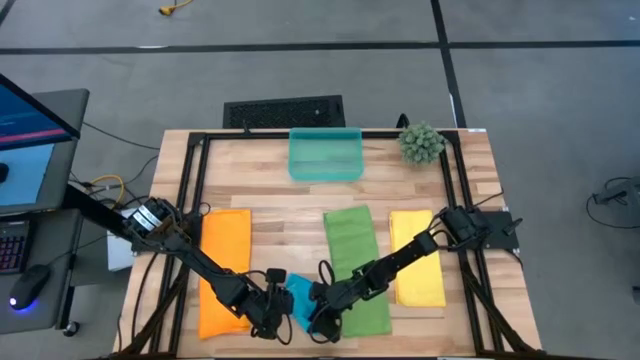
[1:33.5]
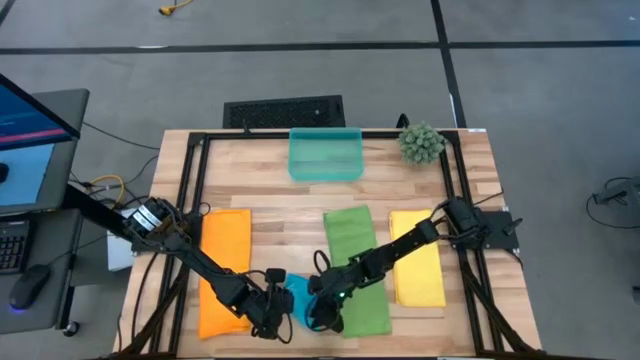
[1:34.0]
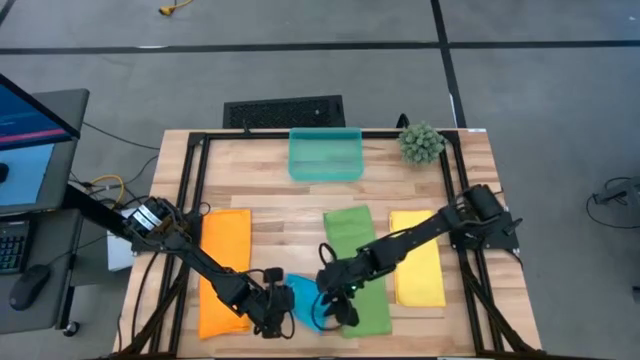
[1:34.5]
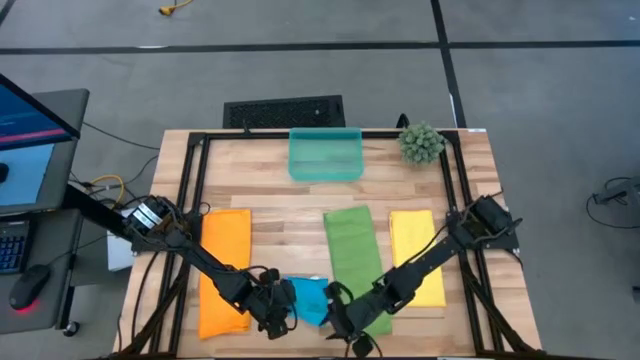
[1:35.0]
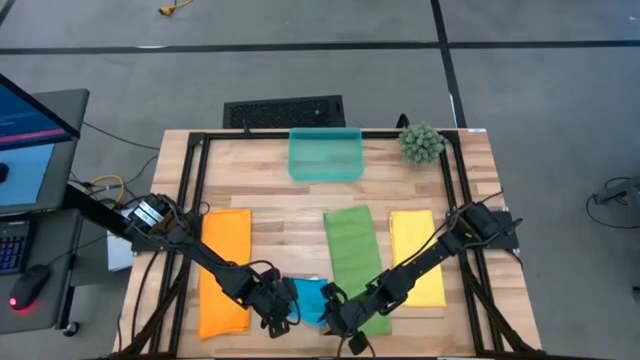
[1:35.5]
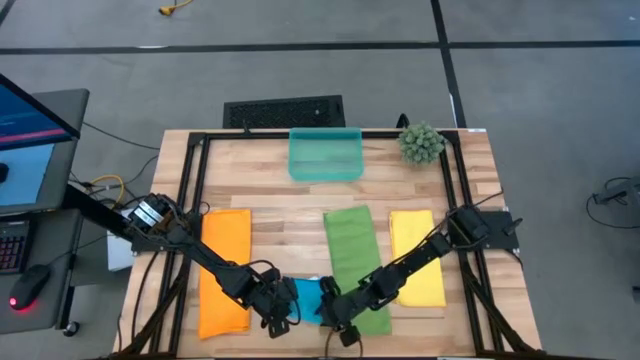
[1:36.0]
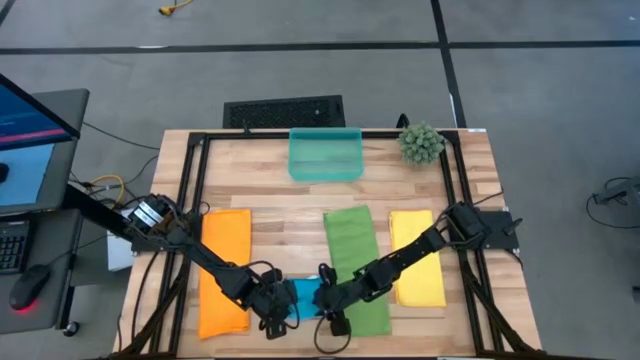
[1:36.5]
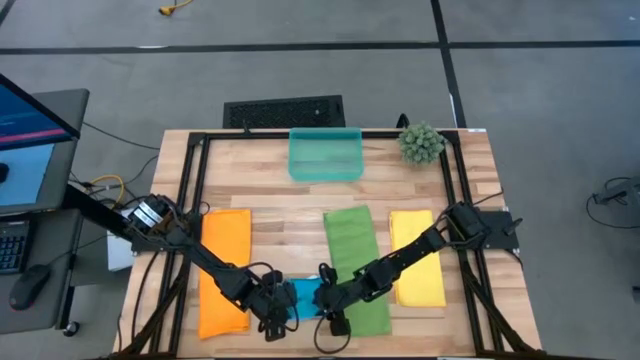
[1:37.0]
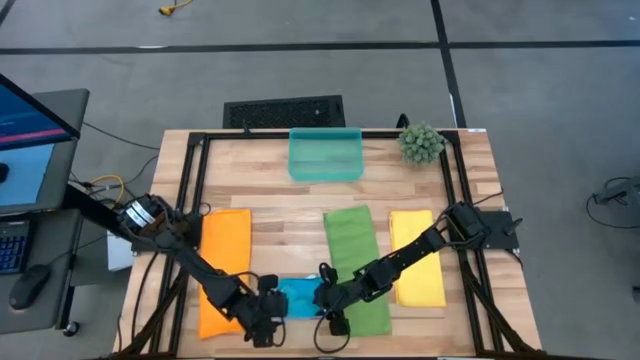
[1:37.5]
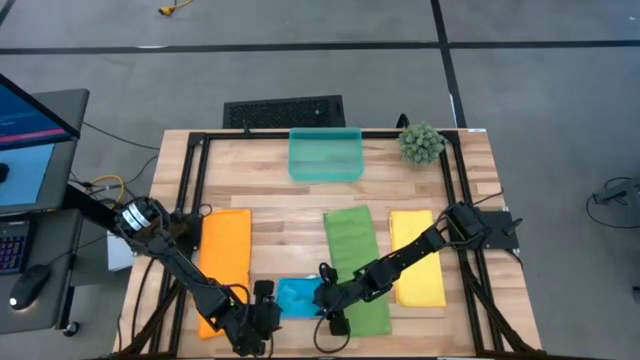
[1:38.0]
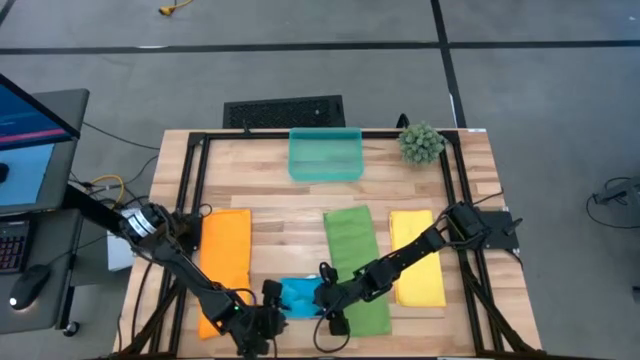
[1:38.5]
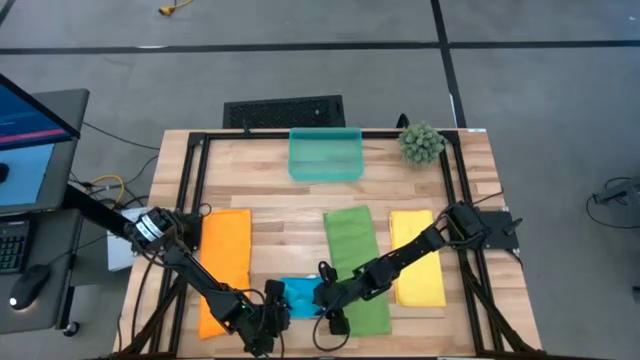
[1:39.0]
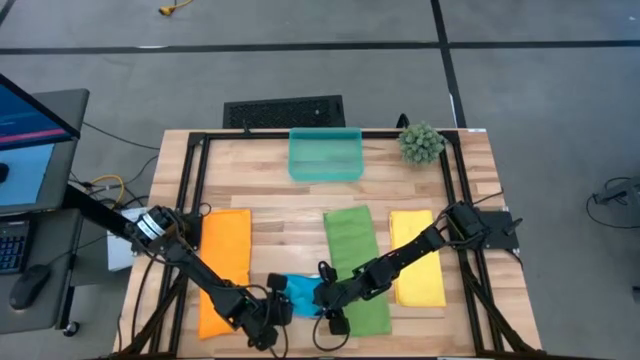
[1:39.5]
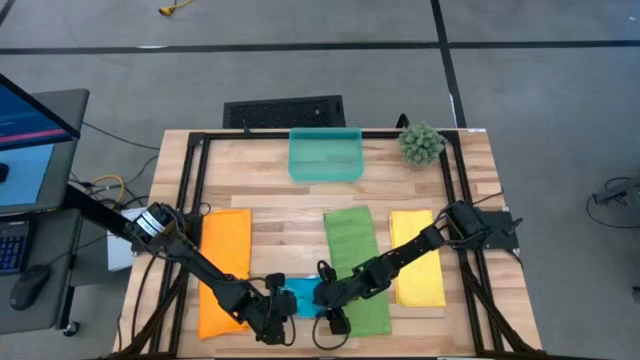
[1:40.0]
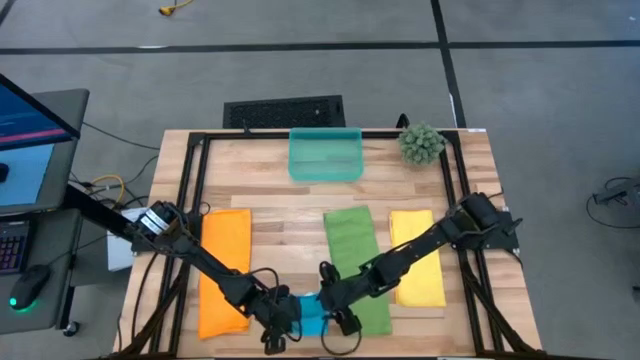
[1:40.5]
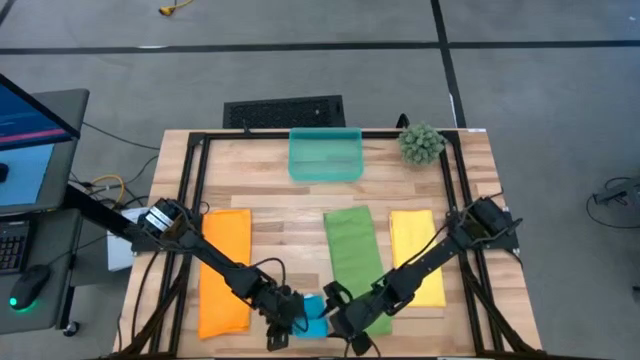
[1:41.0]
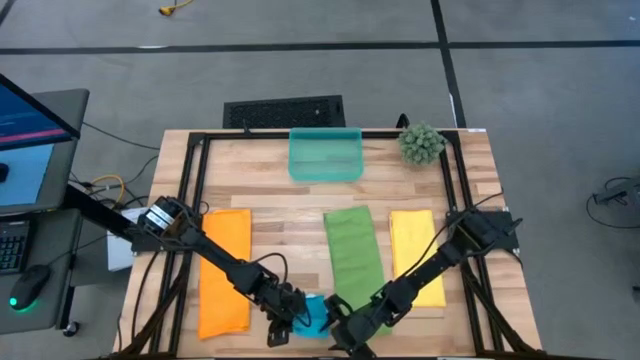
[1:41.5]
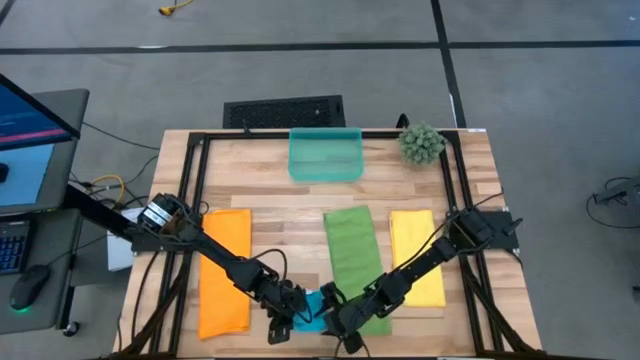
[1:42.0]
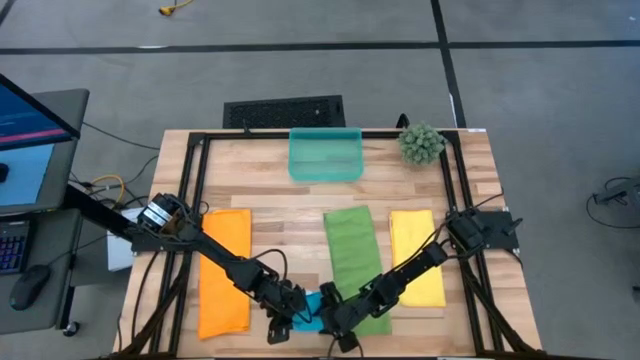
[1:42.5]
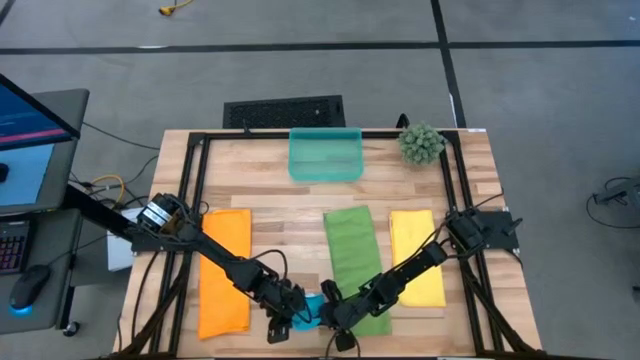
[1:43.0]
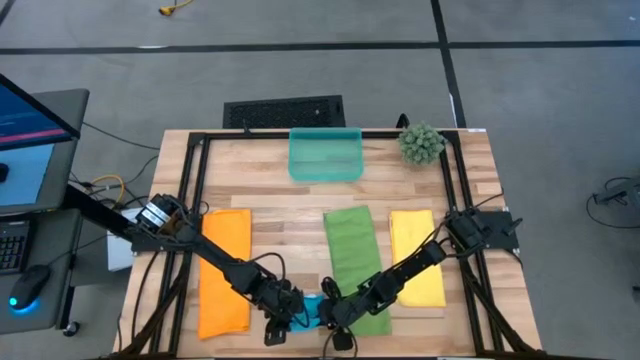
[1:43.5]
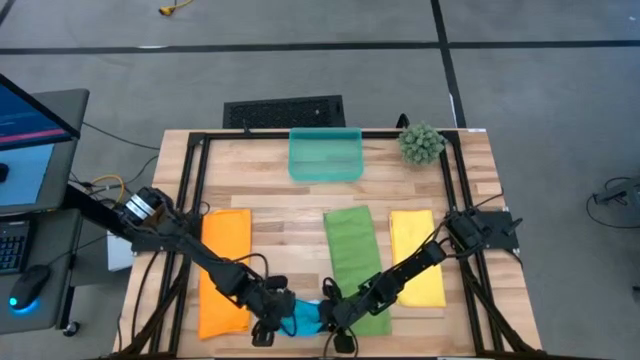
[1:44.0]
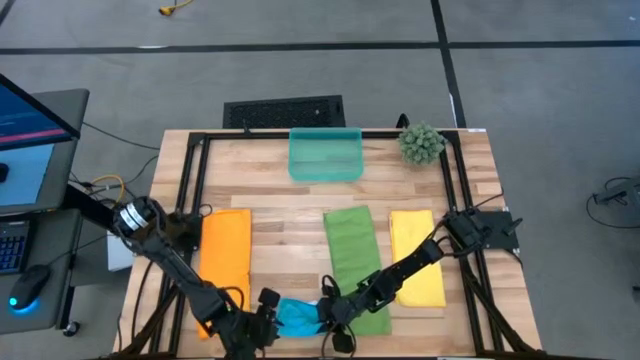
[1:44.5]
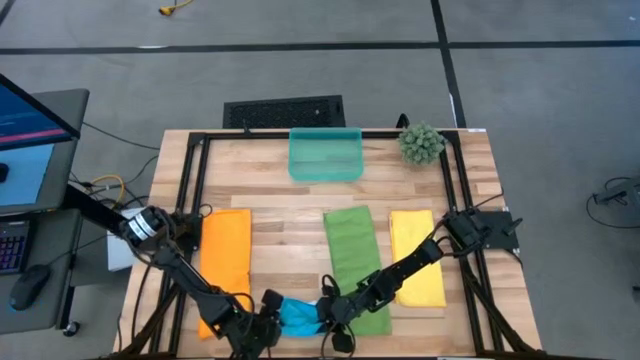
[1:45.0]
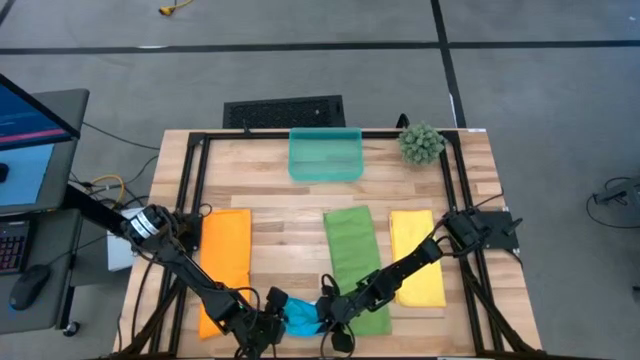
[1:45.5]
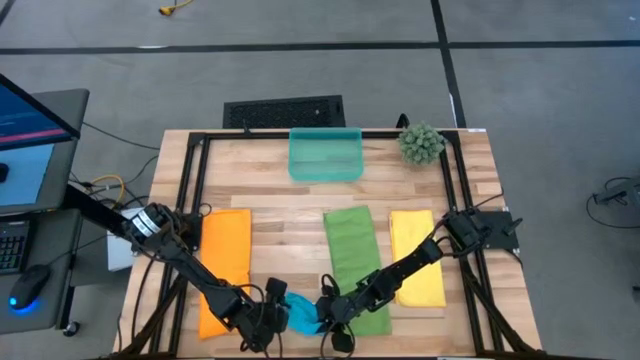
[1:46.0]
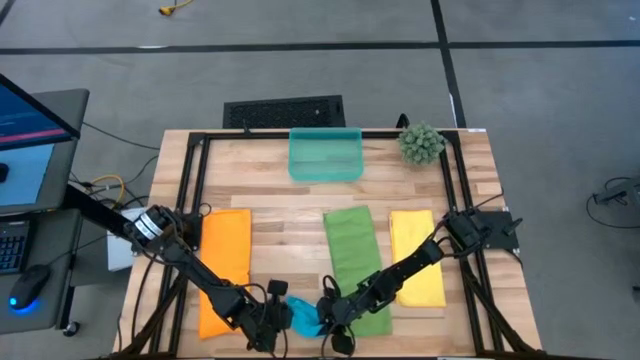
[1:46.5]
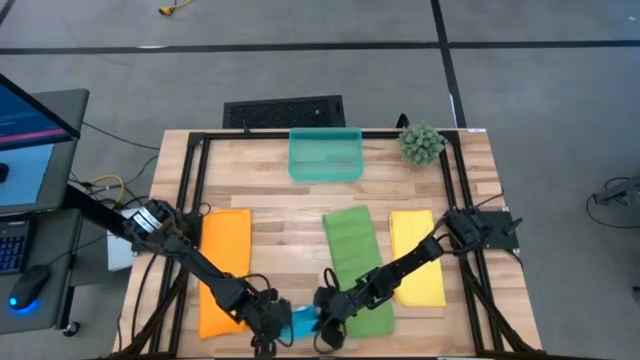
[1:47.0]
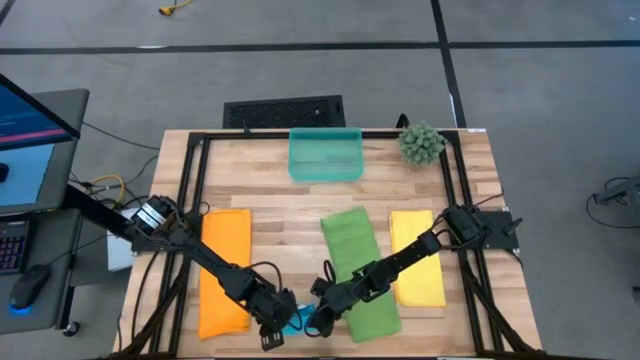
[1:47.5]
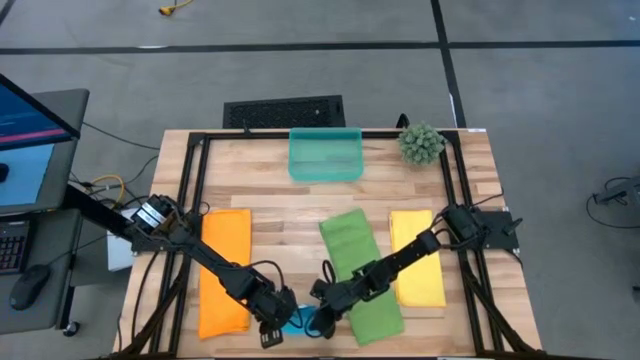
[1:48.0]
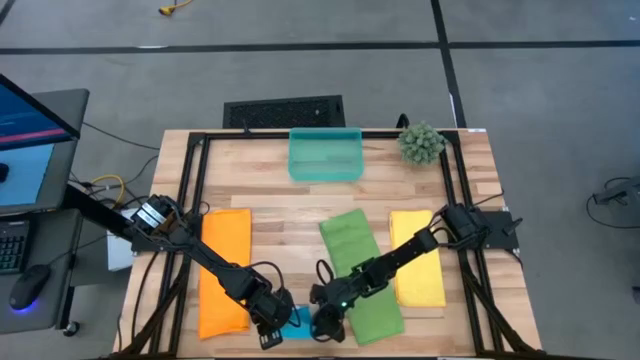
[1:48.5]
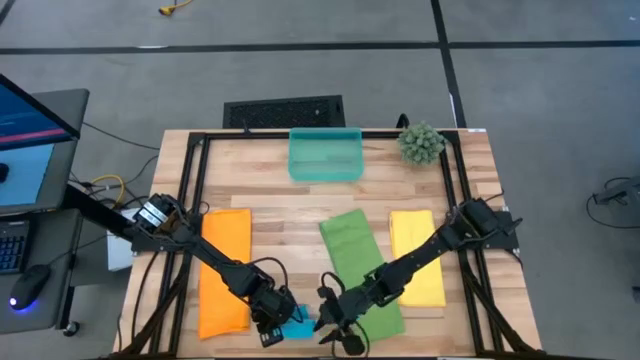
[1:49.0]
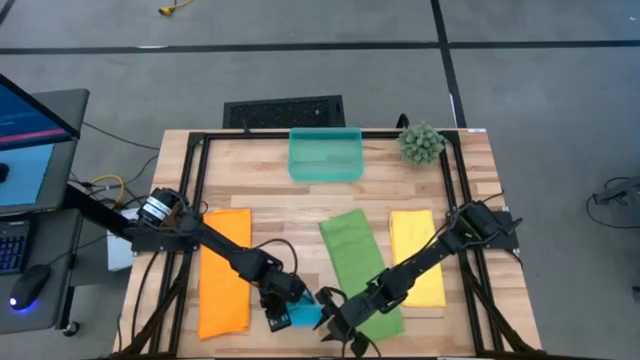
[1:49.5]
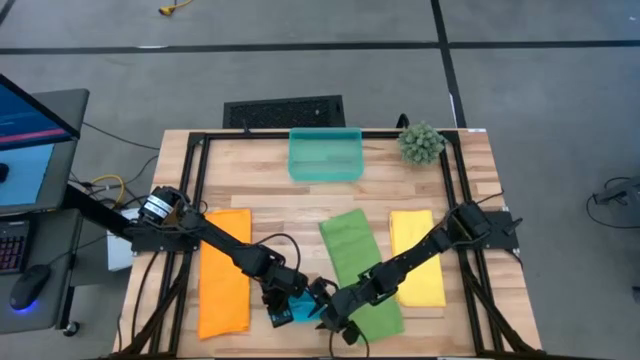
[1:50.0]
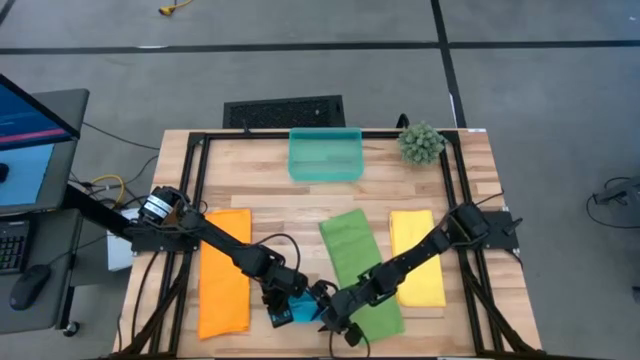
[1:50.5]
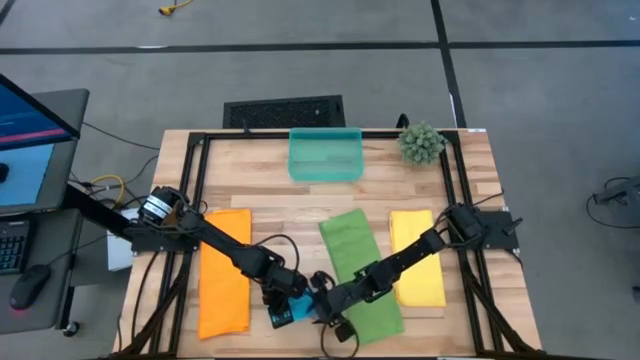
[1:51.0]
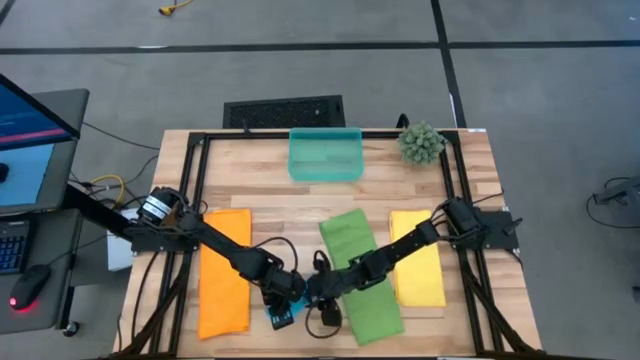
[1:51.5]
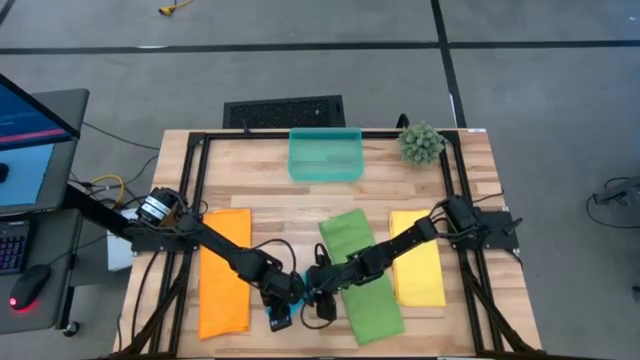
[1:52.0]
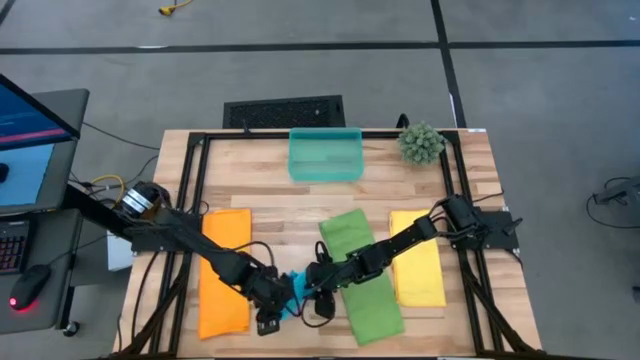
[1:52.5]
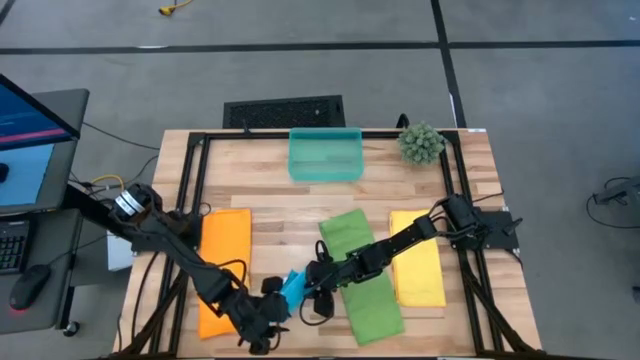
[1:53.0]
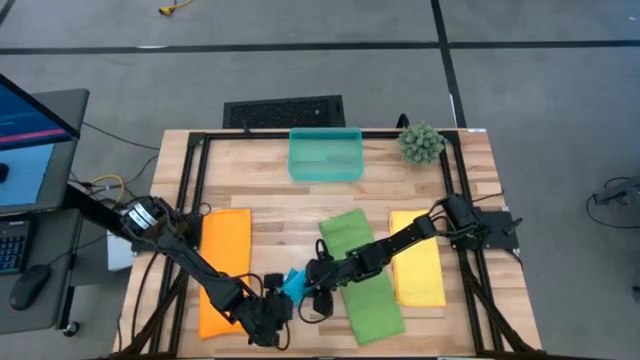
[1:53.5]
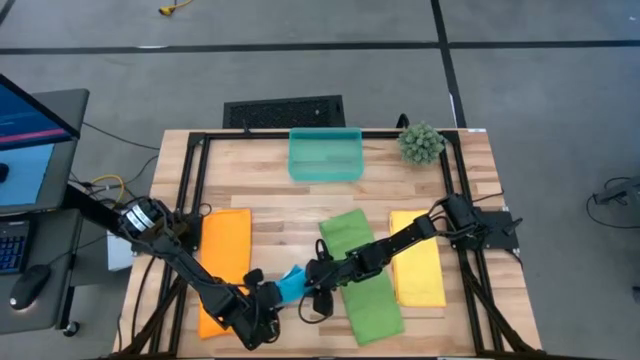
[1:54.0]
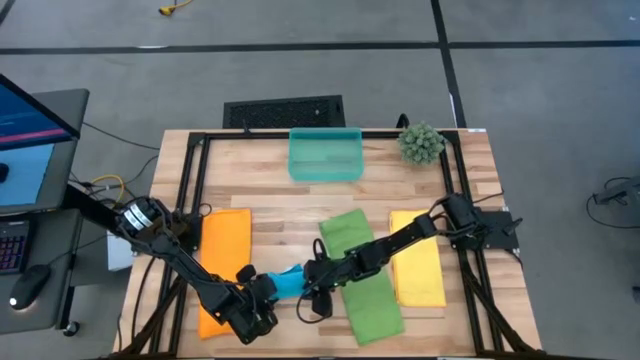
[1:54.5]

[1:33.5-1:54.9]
Task: Roll microfiber towels into tight, uniform cylinder then place into a basket
Roll the blue towel
